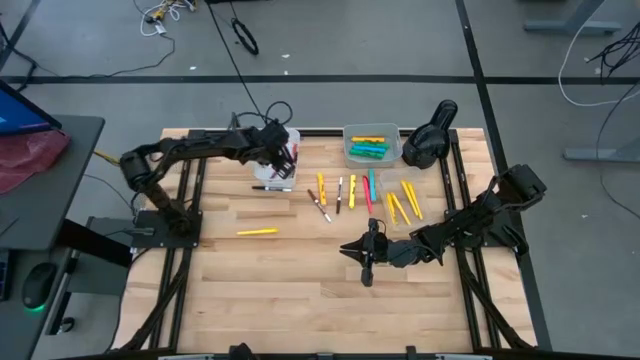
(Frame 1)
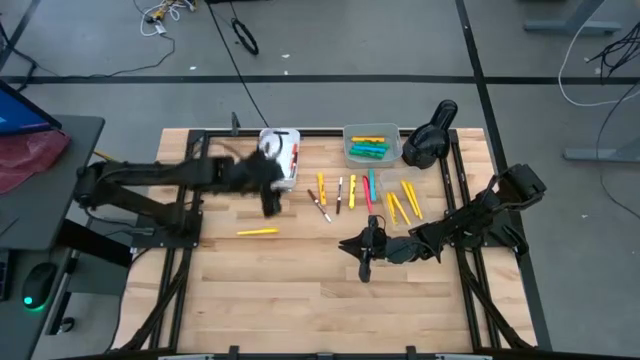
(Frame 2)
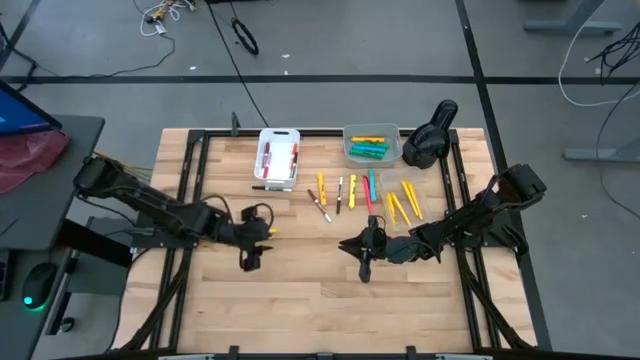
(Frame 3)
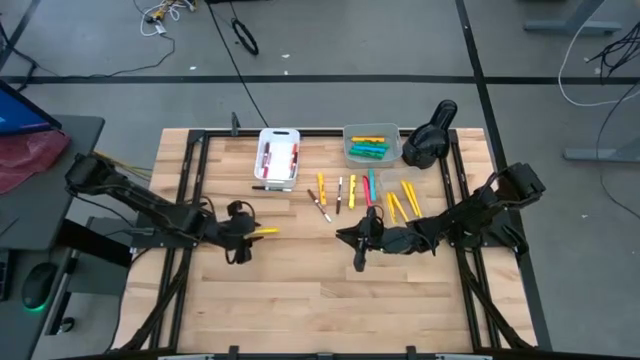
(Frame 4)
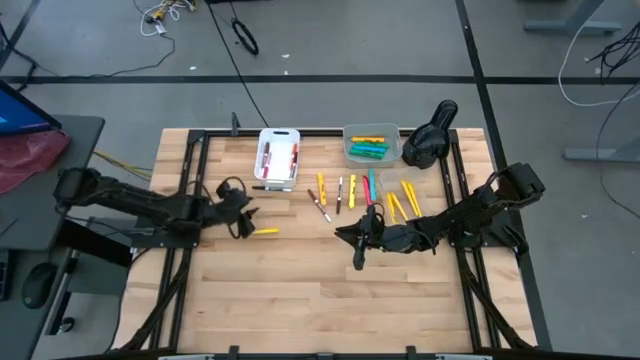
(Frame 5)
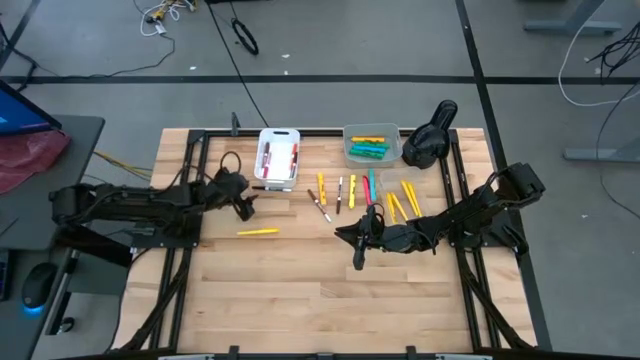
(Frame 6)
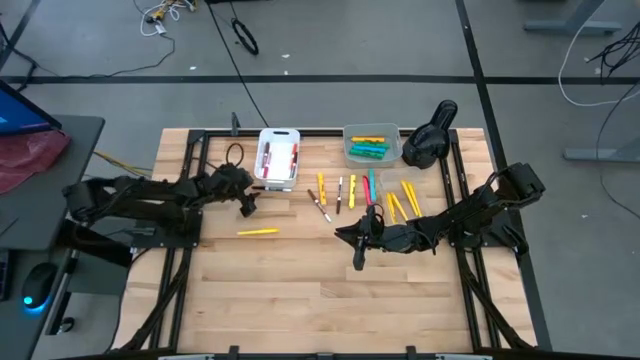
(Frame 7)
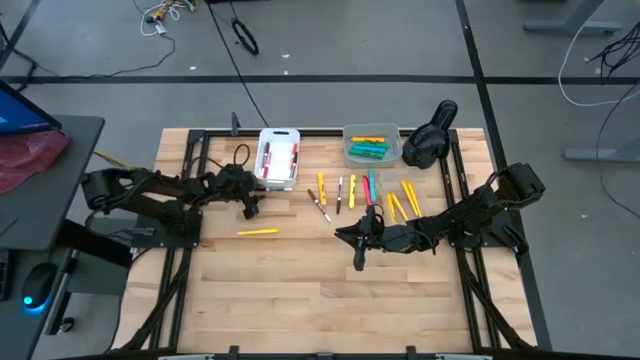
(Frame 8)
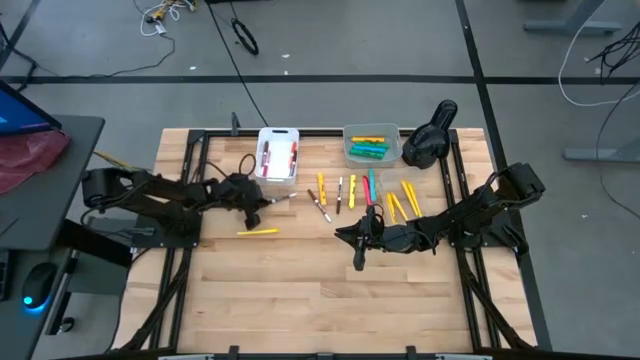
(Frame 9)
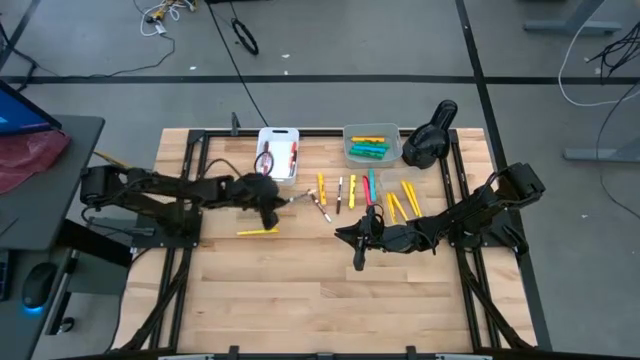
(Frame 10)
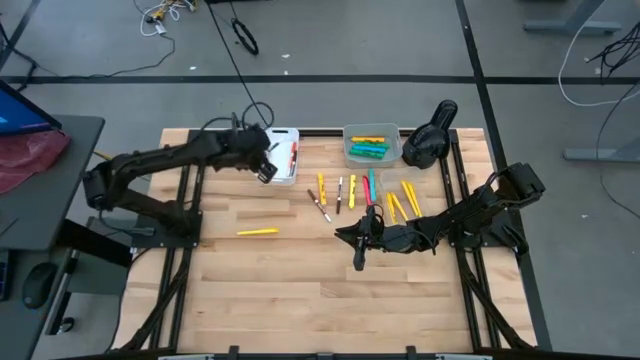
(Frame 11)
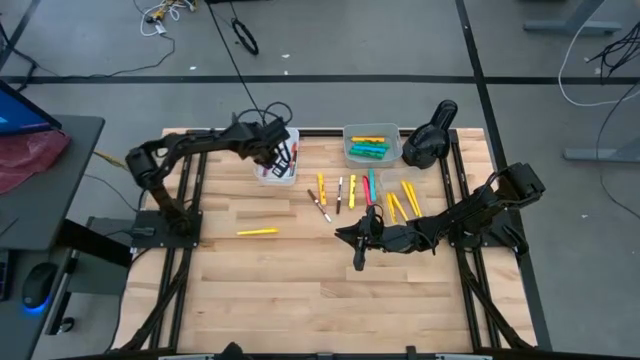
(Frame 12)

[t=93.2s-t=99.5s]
Task: Pick & Place Markers
Put the black marker pen into the white bin

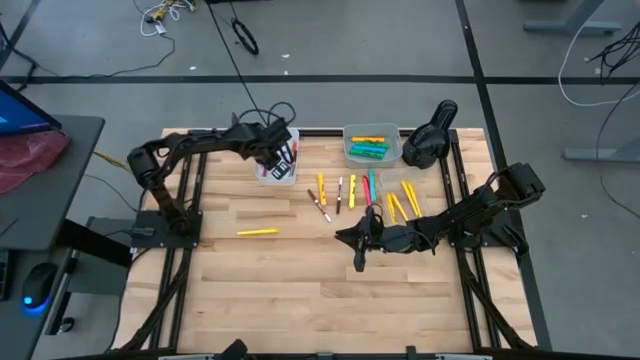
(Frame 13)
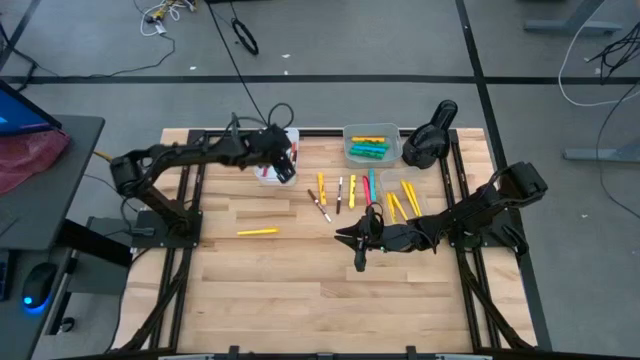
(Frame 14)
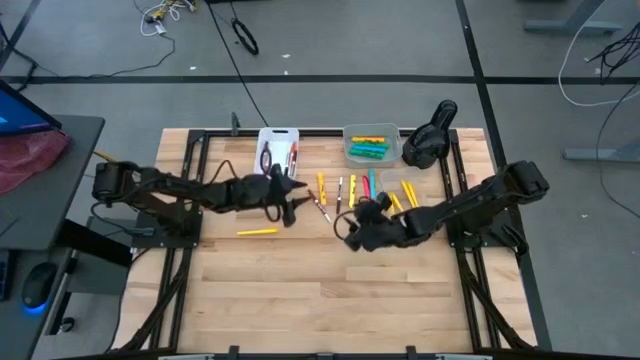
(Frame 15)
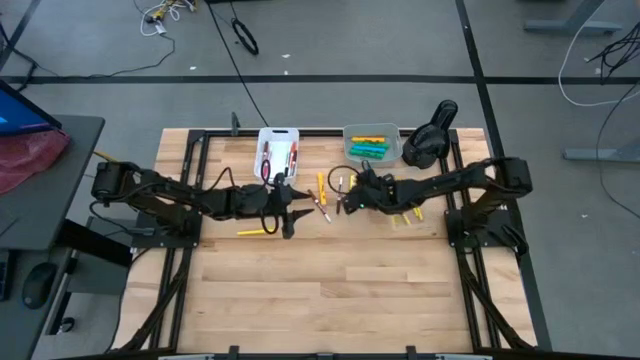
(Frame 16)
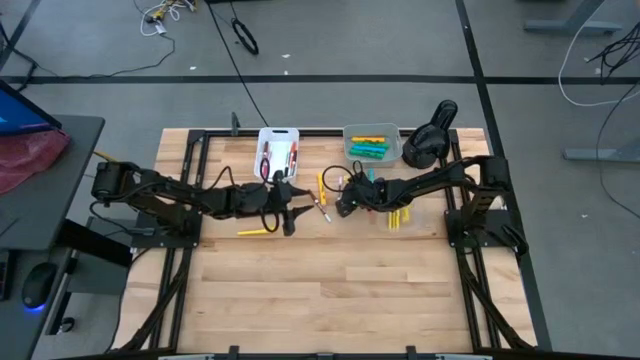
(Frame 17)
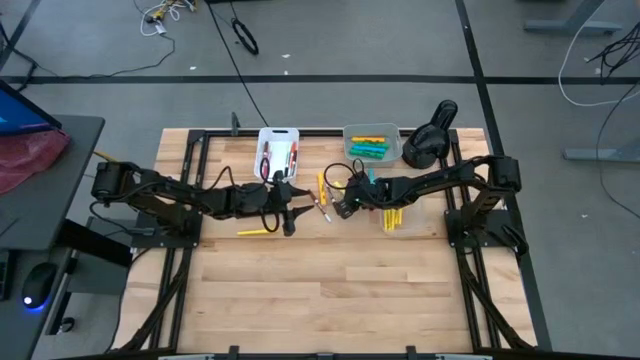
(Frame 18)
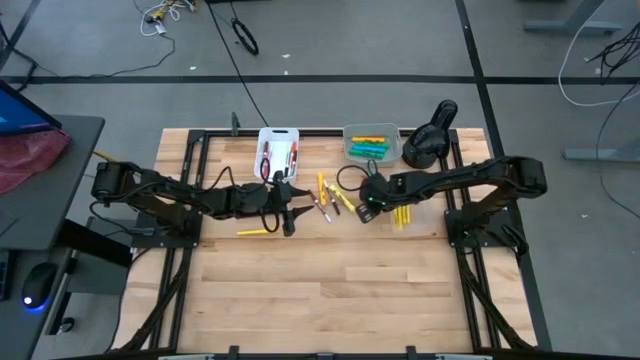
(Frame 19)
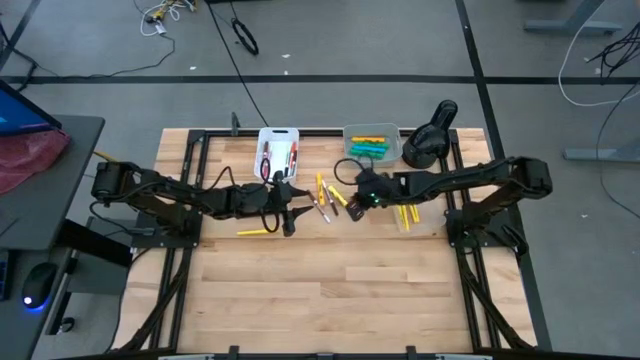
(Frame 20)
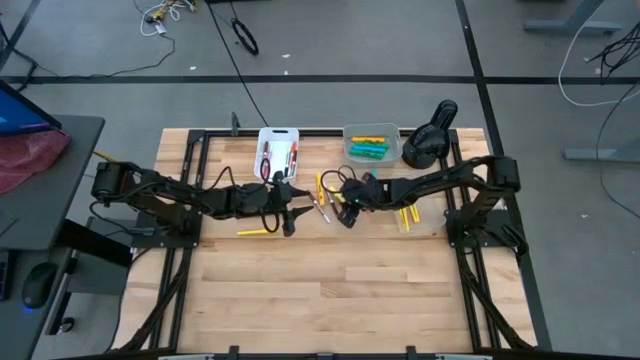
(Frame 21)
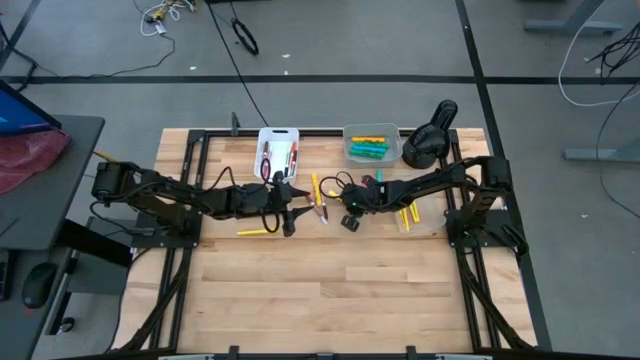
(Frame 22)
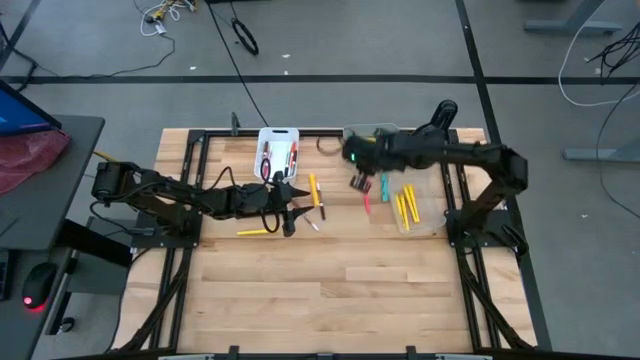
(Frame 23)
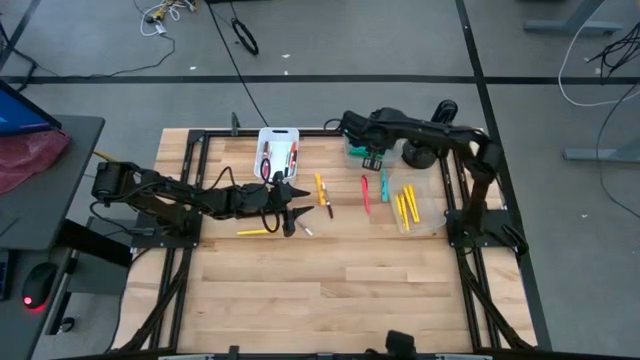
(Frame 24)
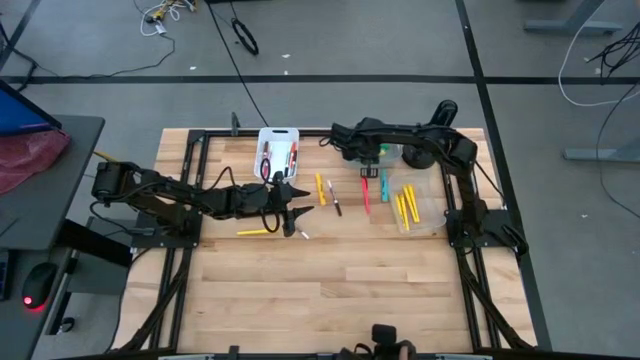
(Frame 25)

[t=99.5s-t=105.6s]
Put the light yellow highlighter pen into the gray bin

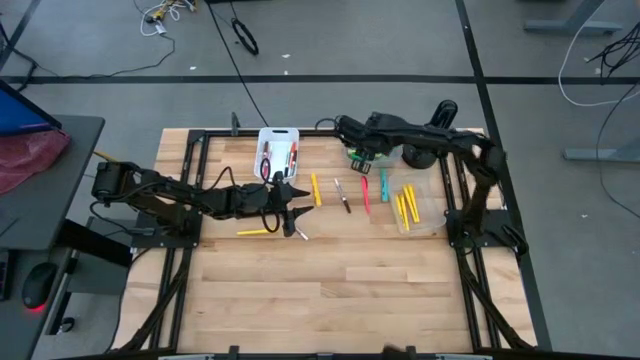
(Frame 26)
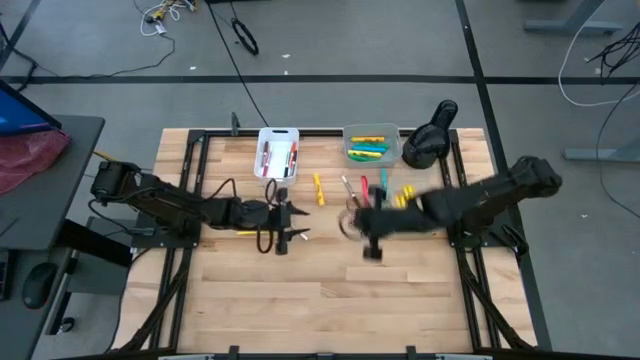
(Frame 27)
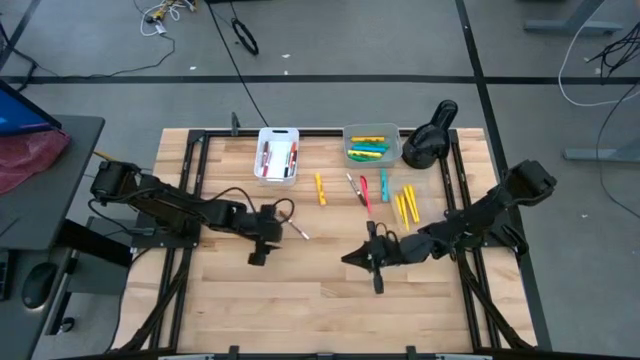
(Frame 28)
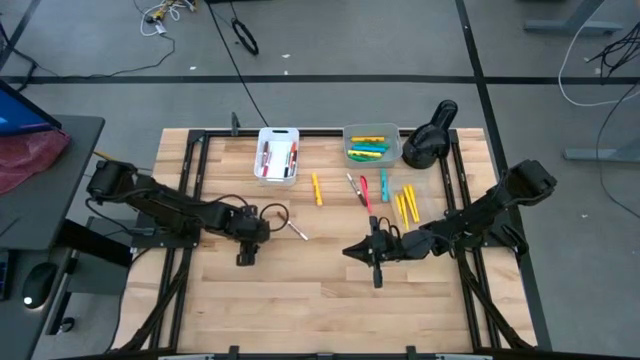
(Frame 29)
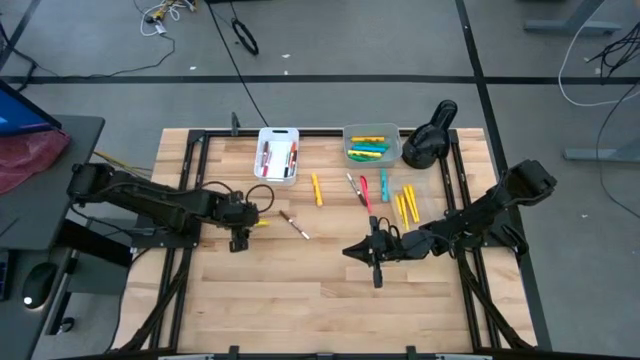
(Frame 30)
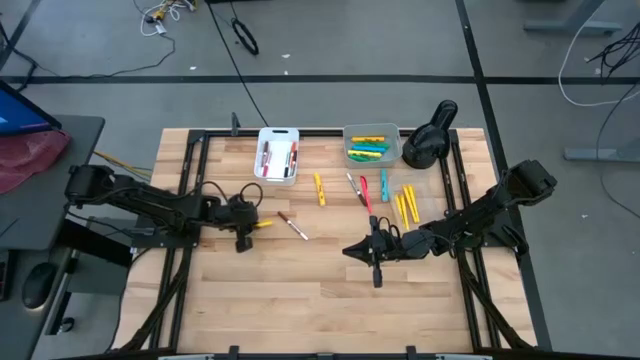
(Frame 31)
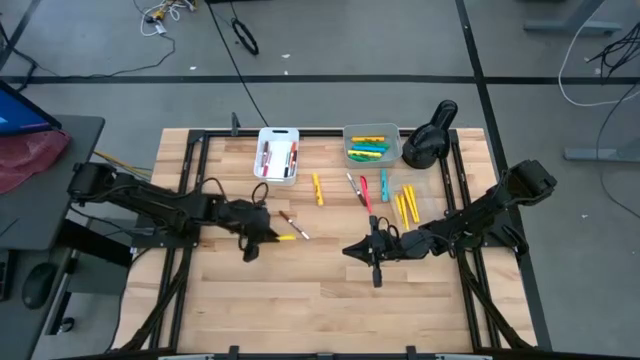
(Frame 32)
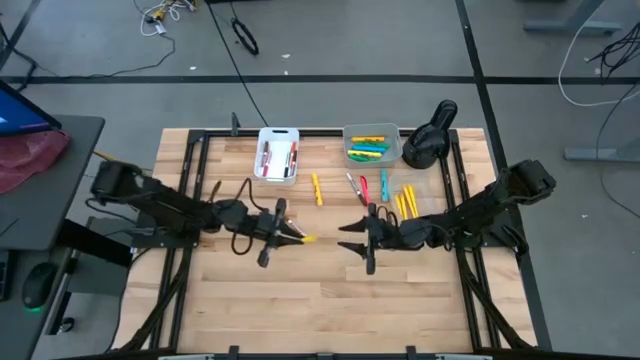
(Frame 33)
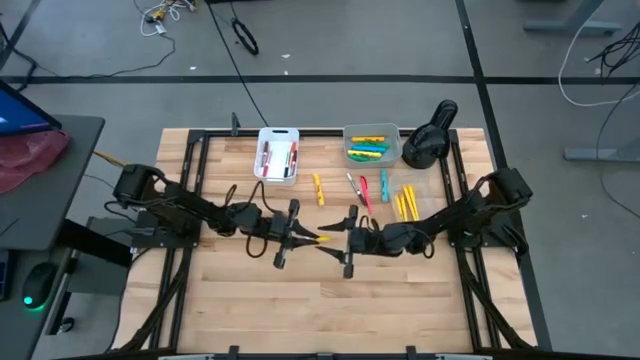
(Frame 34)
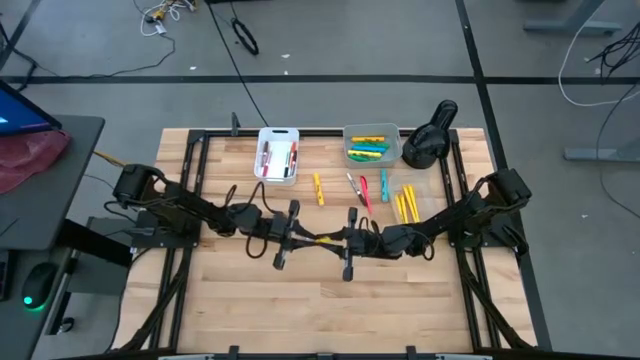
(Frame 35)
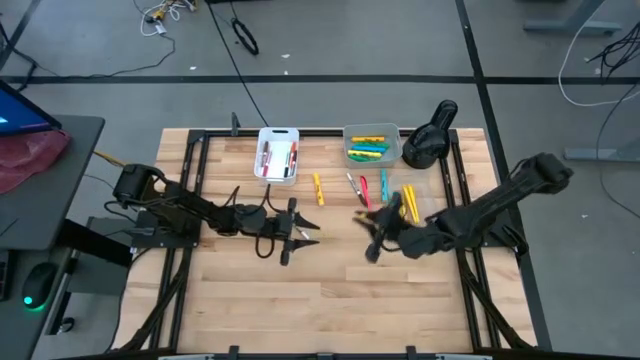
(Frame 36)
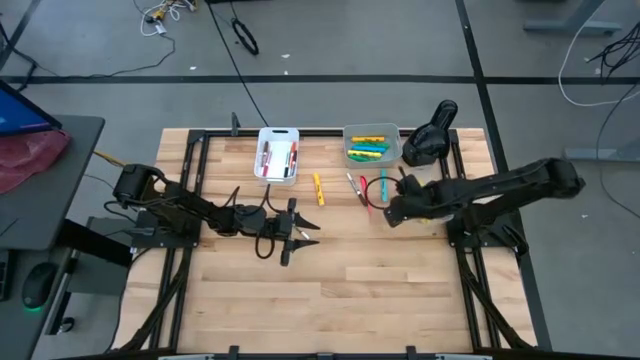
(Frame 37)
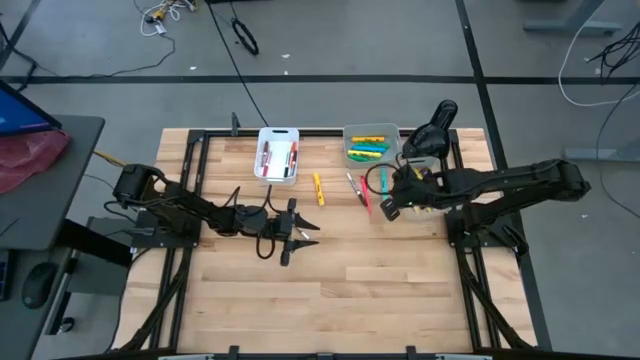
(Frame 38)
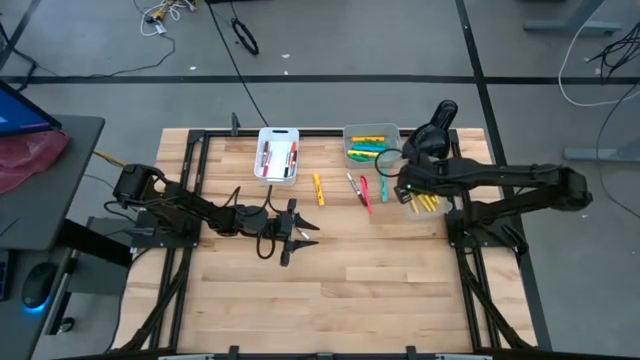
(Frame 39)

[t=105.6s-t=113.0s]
Put the yellow pen into the transparent bin

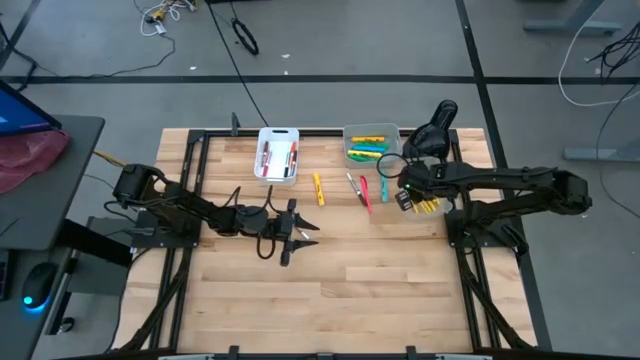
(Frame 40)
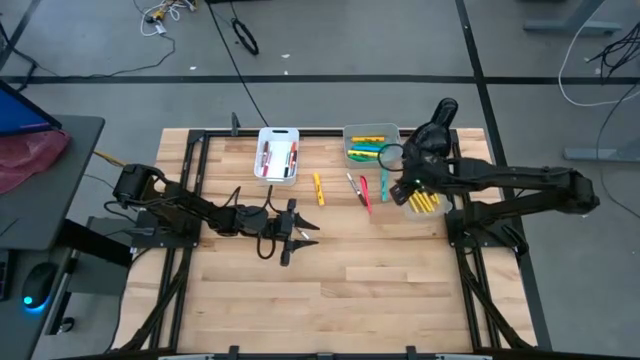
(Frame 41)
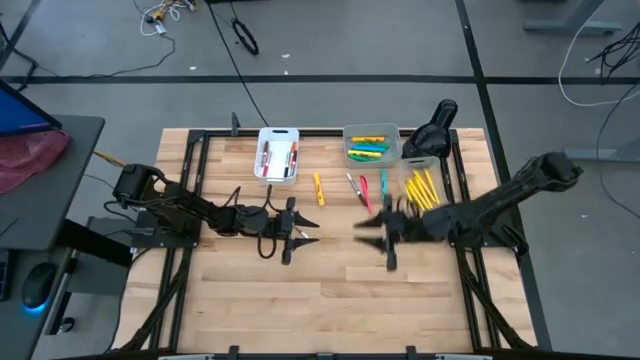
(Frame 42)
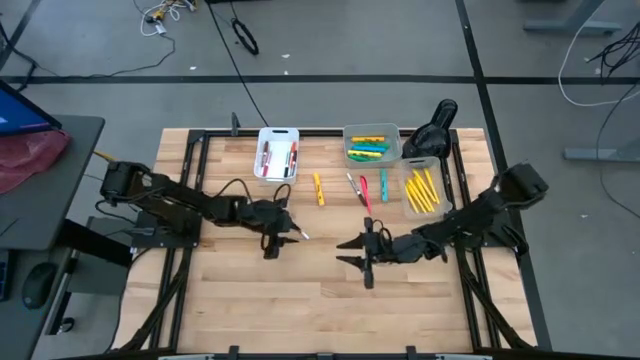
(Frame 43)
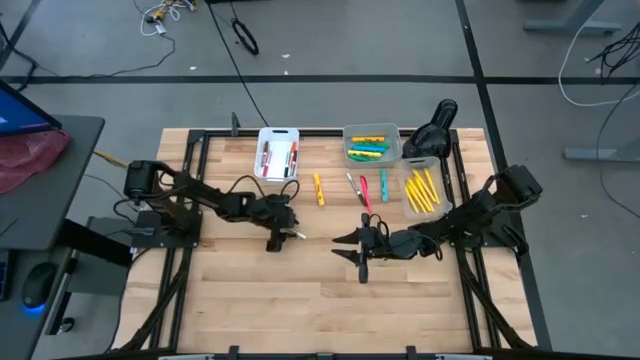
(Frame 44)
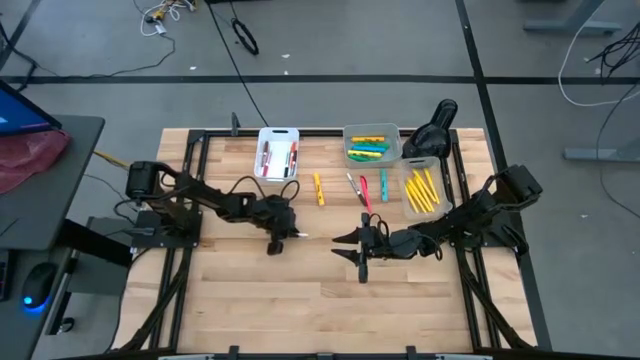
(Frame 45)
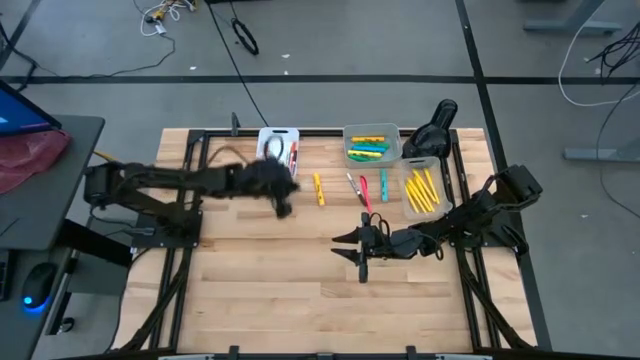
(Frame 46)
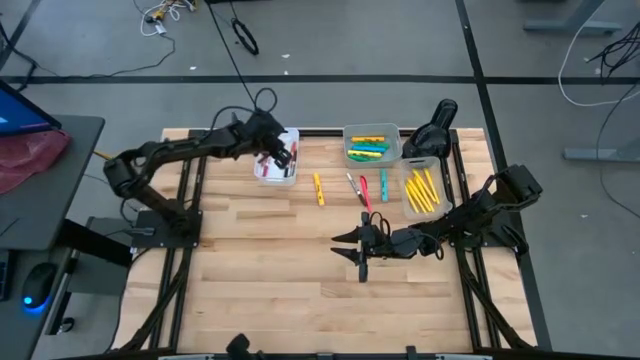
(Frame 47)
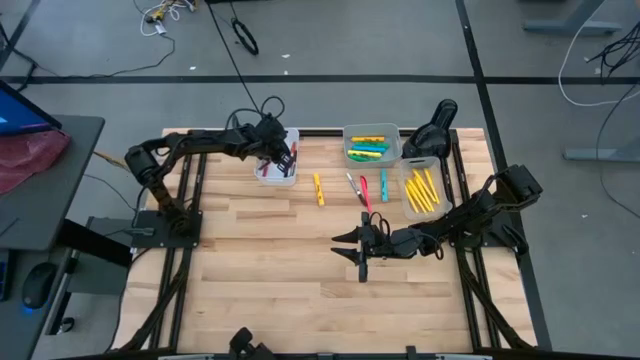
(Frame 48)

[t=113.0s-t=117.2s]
Put the light brown marker pen into the white bin
